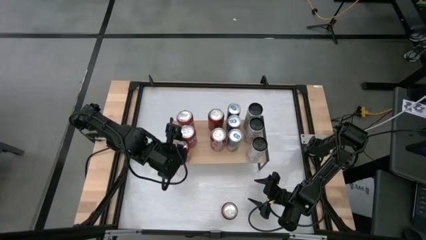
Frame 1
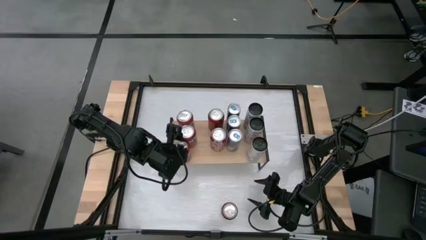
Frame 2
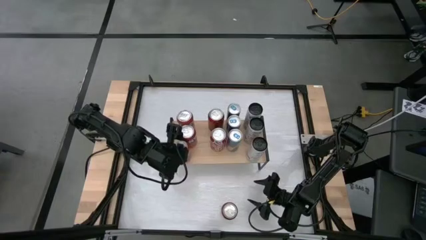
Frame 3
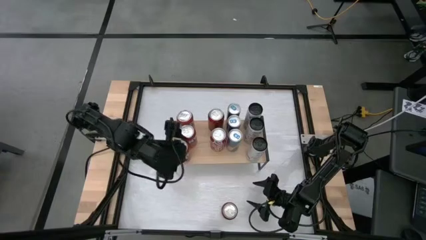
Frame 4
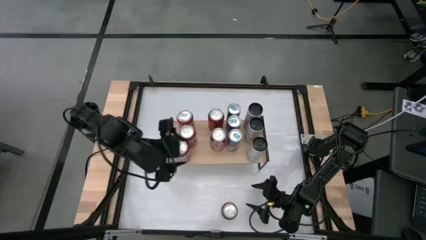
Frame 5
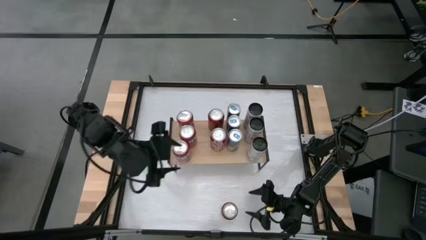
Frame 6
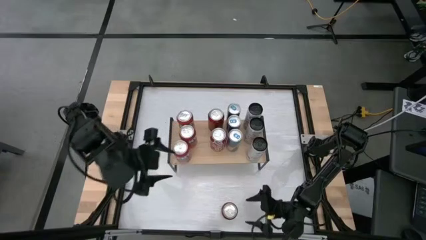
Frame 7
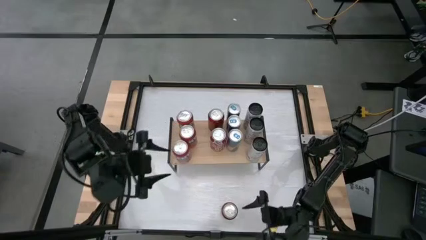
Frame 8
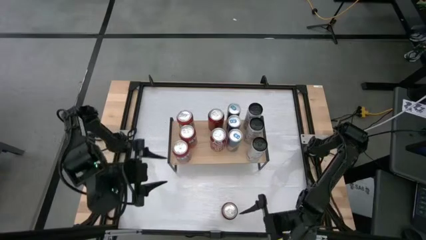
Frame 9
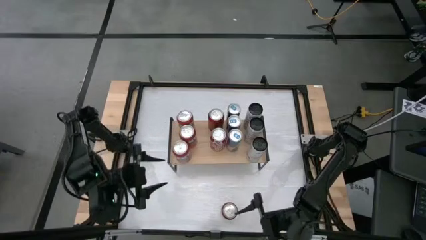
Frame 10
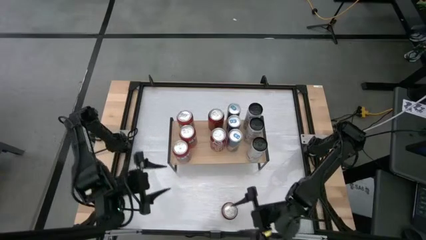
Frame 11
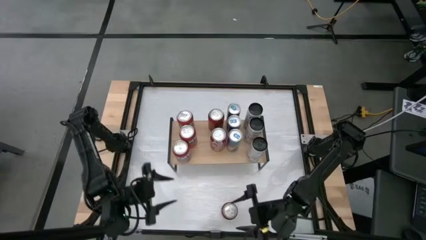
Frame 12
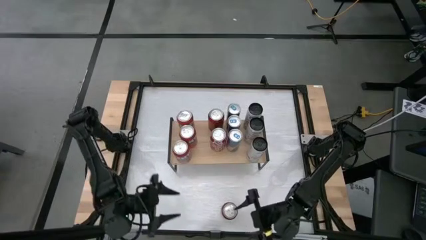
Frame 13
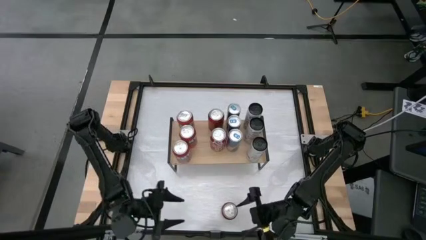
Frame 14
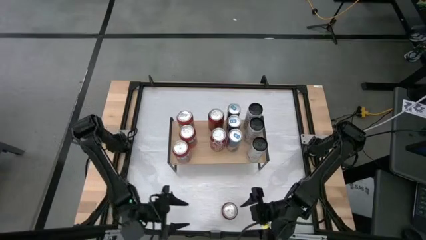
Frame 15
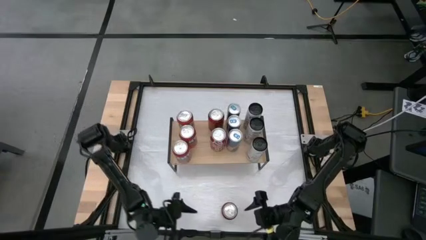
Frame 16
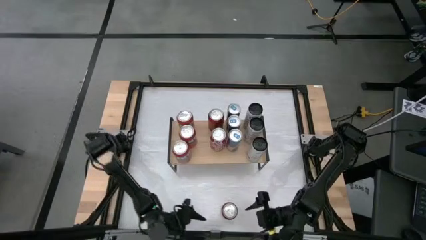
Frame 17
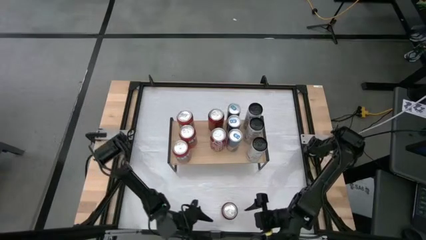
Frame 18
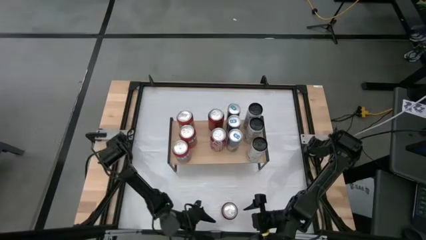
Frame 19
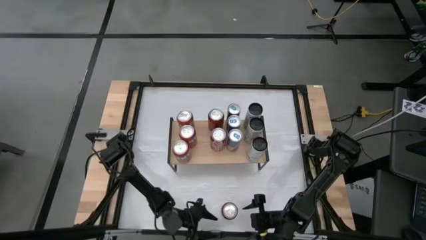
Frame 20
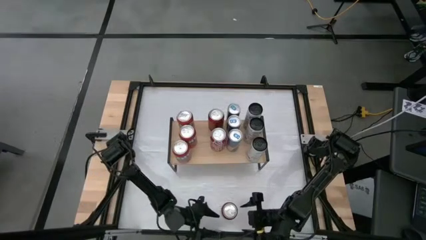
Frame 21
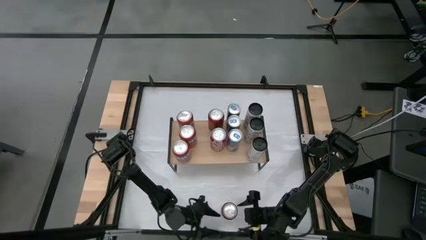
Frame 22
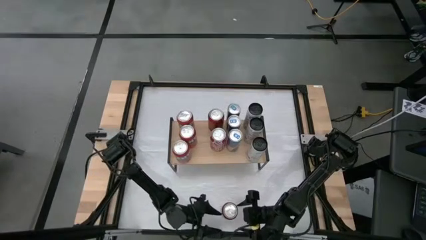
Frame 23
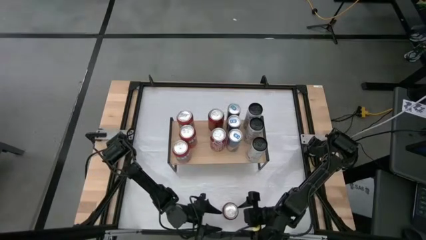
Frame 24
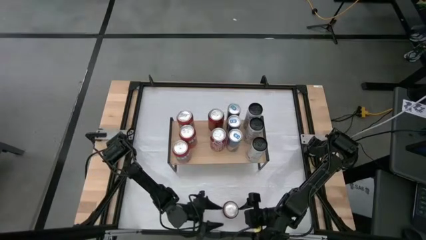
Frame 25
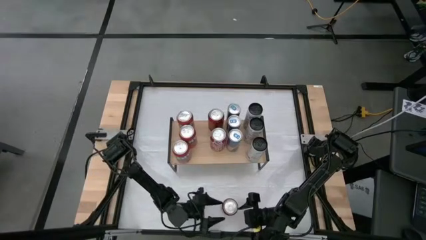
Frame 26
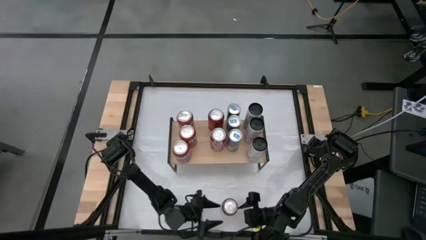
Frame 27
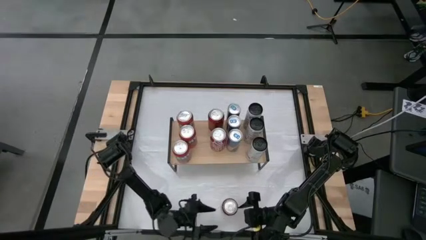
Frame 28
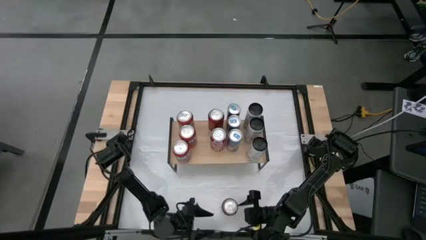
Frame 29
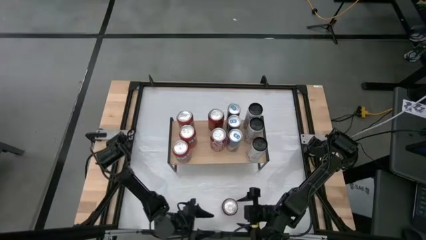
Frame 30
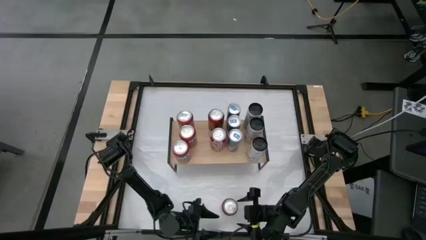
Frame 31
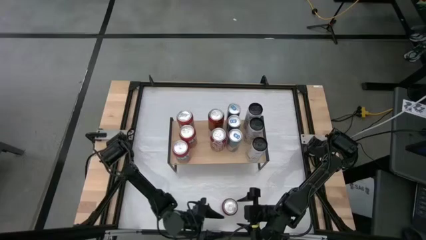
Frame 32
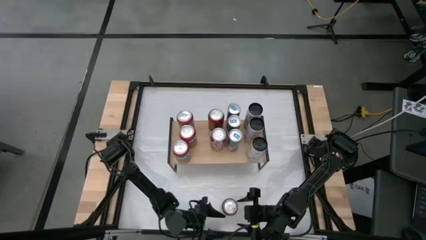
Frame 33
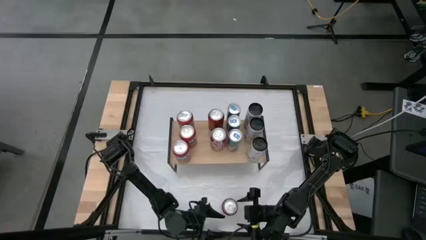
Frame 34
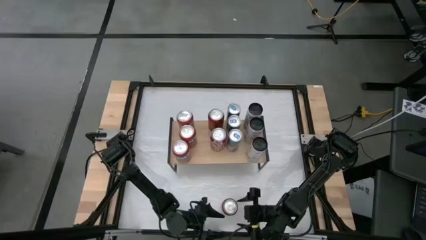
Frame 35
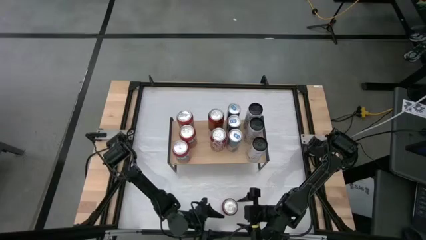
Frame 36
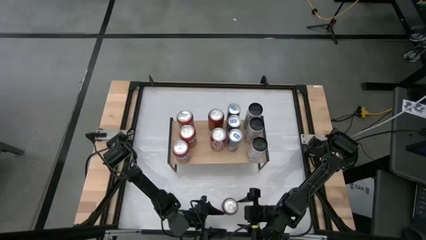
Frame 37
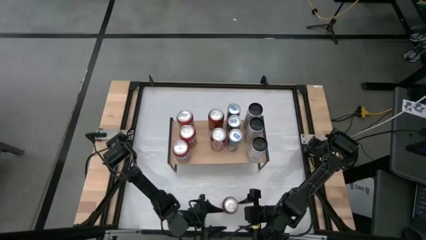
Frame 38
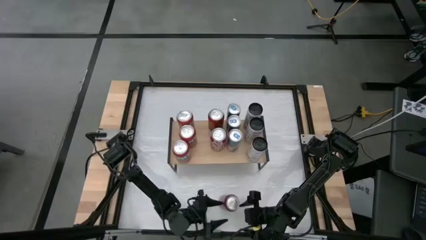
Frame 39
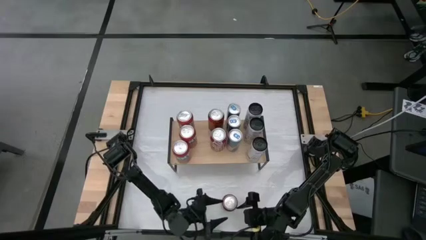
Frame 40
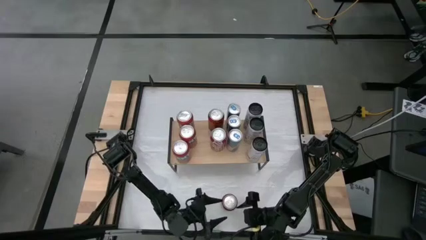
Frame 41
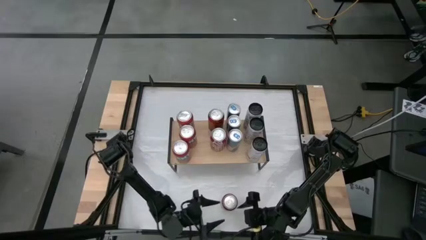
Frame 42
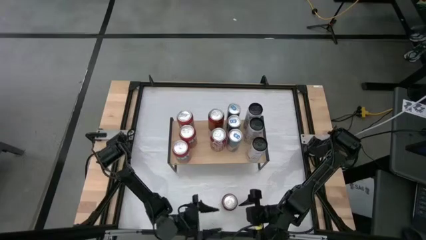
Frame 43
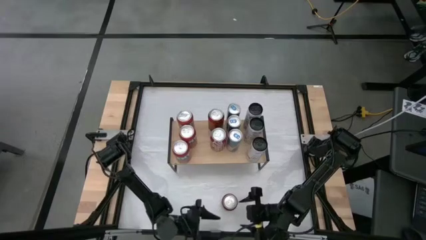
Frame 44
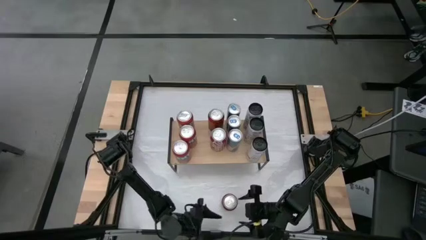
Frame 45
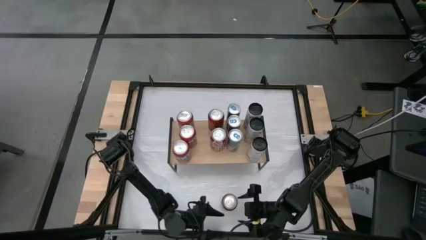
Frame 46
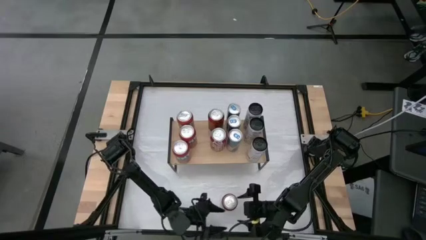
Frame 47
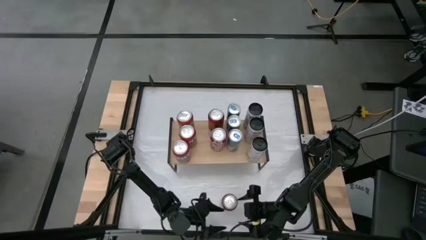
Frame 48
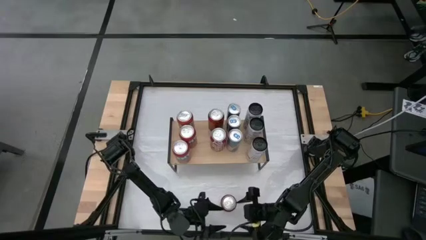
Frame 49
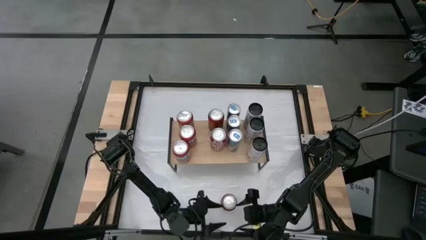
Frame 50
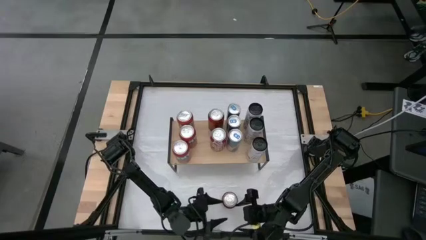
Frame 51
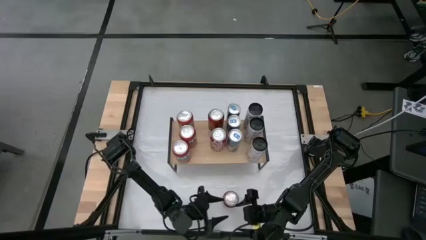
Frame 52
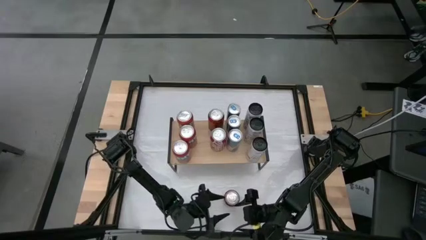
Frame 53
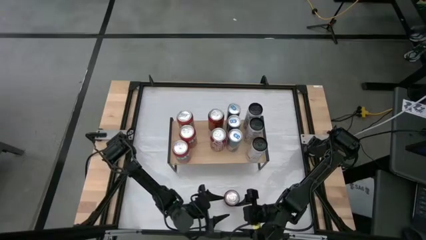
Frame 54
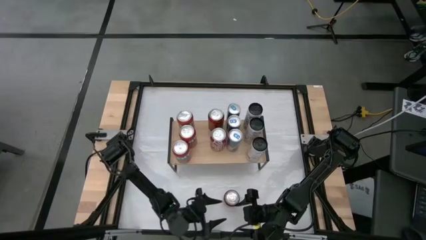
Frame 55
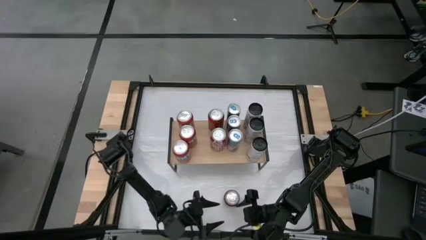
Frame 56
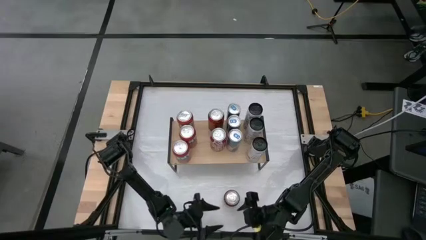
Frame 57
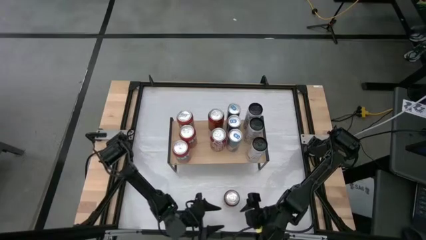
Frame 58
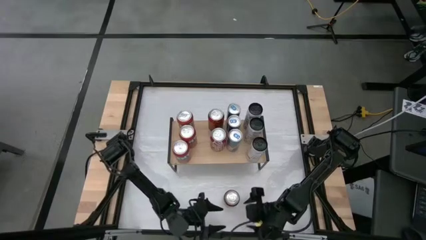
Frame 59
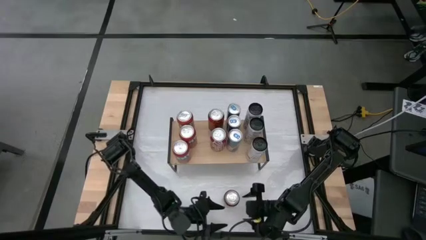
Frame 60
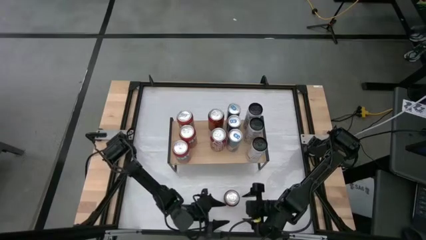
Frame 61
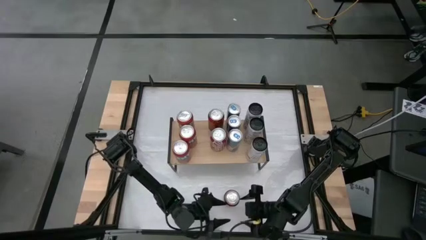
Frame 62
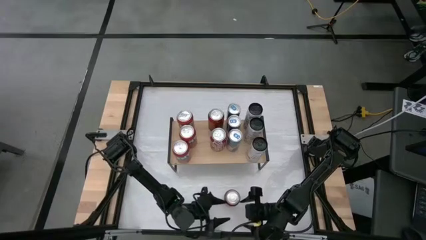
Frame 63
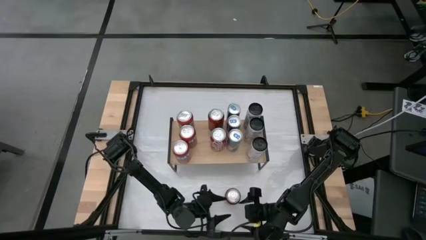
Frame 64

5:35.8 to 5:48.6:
Task: Place canned beverage on shelf
Put the red-black soda can on the shelf aligned with the other red-black soda cans

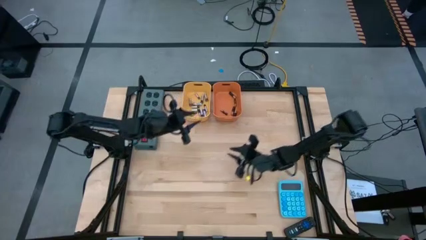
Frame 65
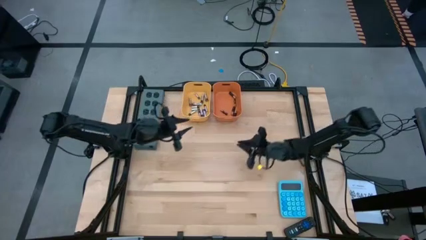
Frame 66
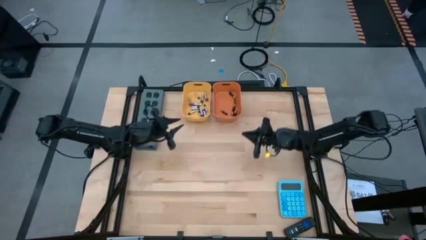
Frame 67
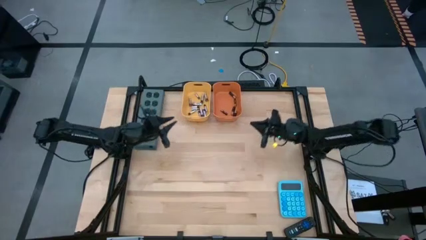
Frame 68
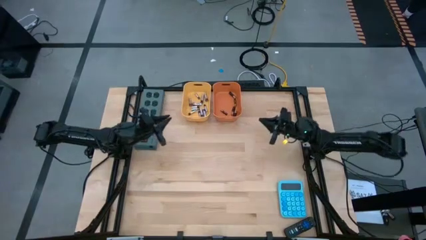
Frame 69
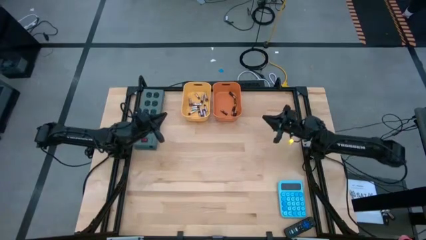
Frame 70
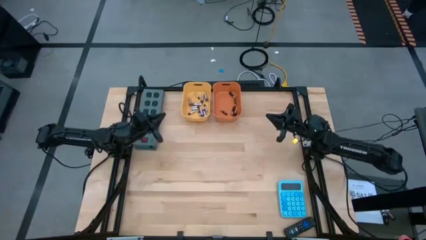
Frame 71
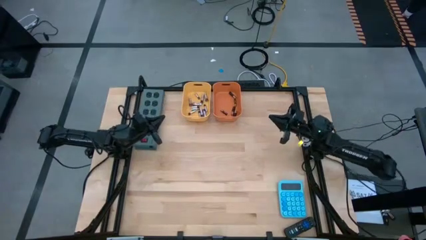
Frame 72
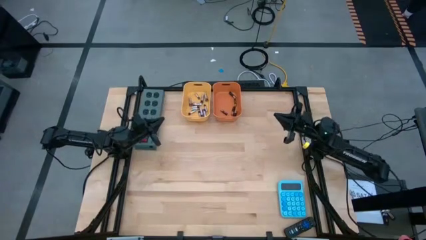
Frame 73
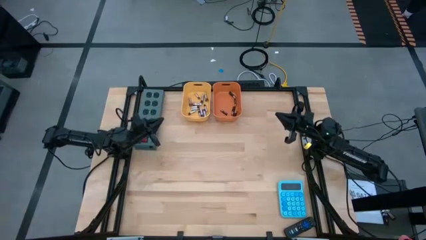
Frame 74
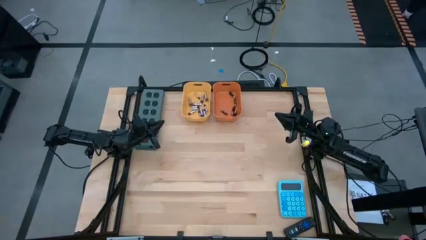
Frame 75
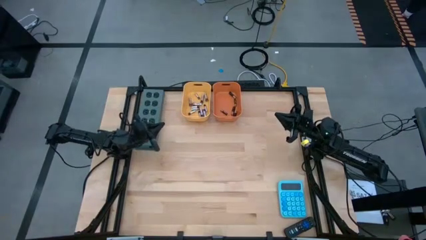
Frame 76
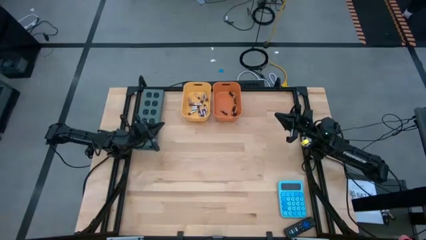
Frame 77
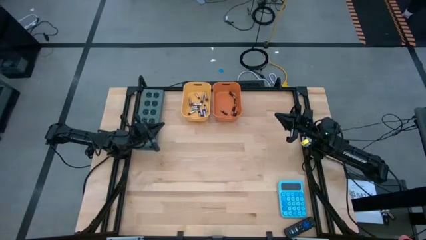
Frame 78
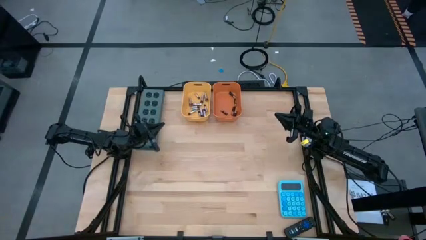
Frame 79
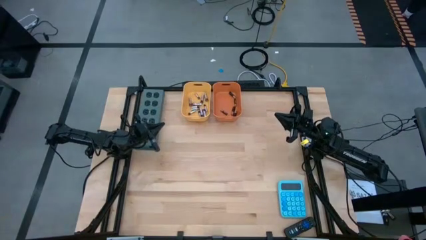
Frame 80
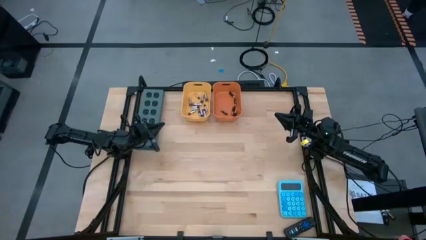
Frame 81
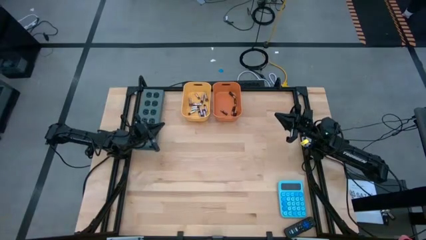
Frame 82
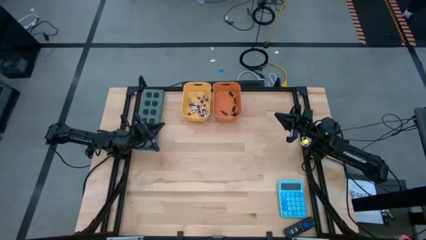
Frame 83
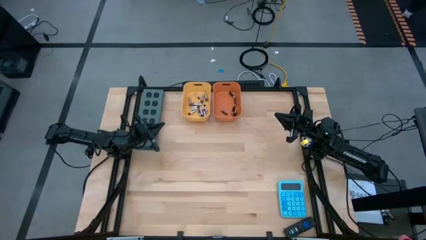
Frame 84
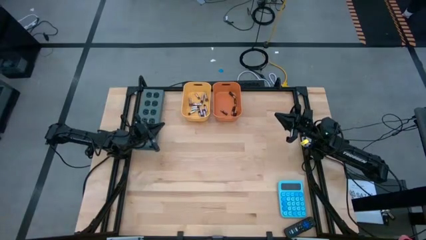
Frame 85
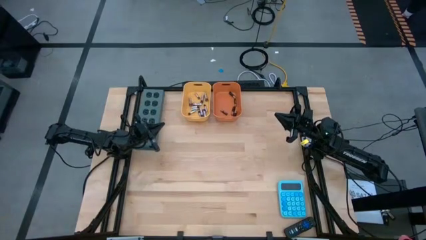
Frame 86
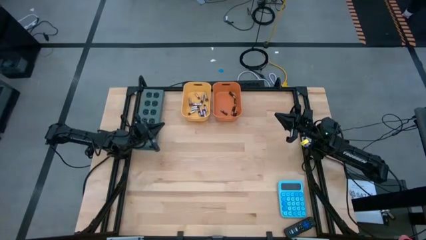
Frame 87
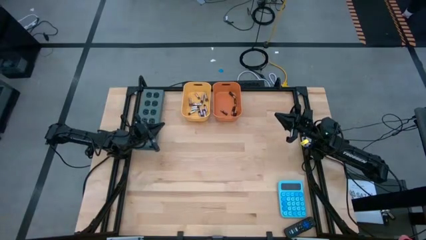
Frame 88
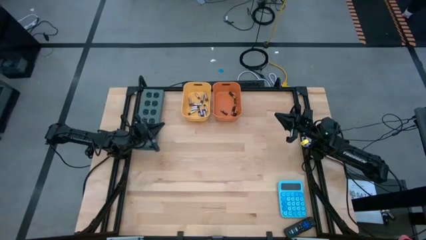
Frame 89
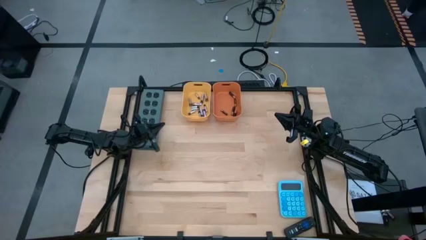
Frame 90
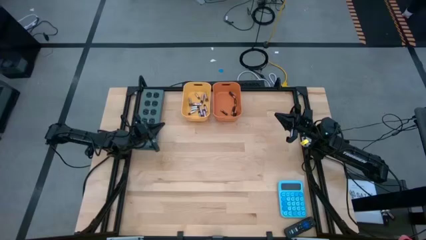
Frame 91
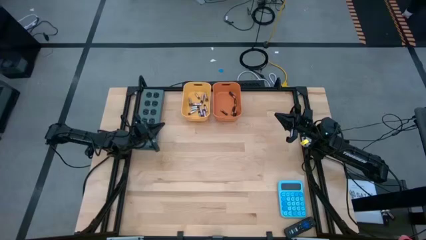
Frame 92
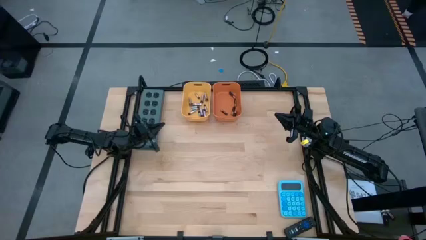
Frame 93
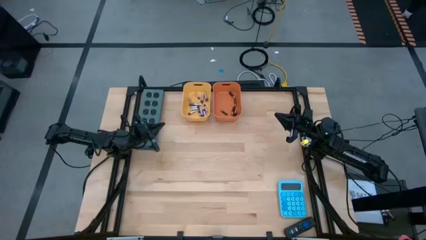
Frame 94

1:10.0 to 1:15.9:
Task: Sort batteries
Return to home position
